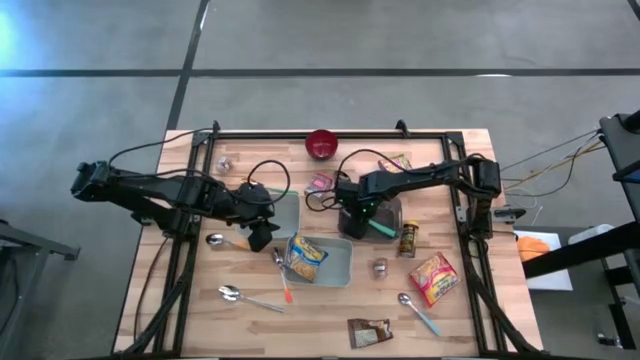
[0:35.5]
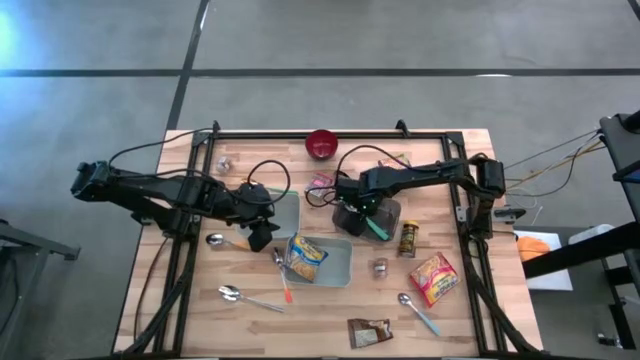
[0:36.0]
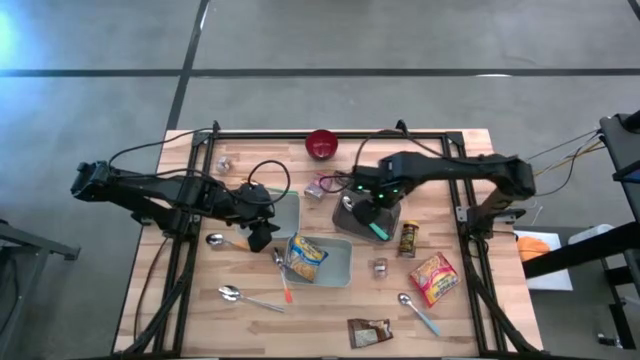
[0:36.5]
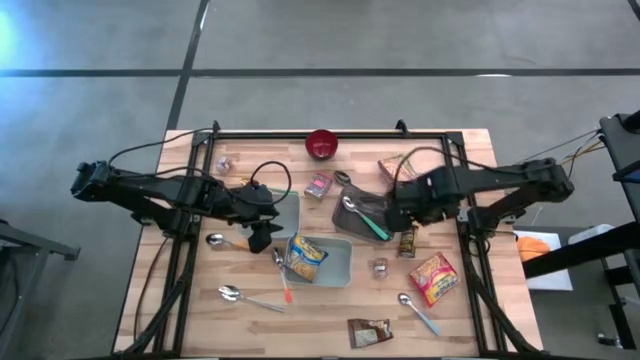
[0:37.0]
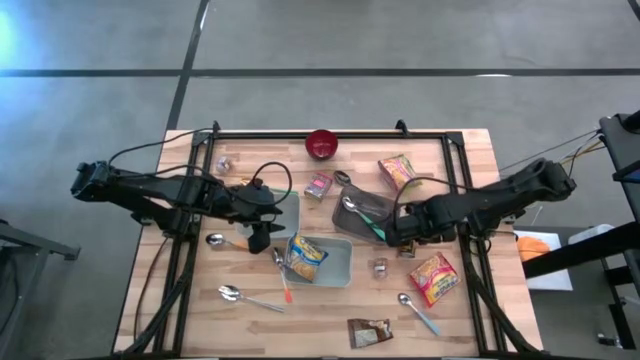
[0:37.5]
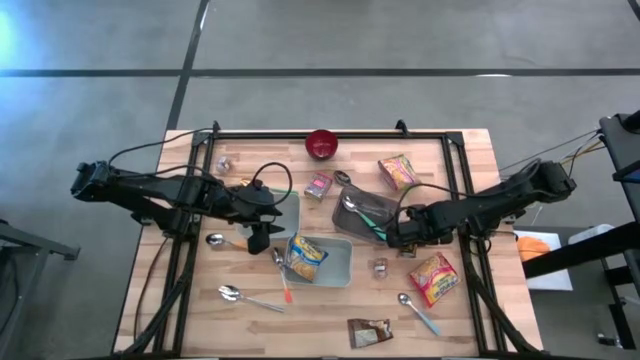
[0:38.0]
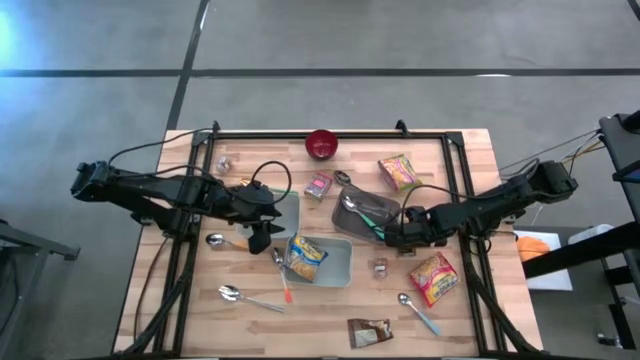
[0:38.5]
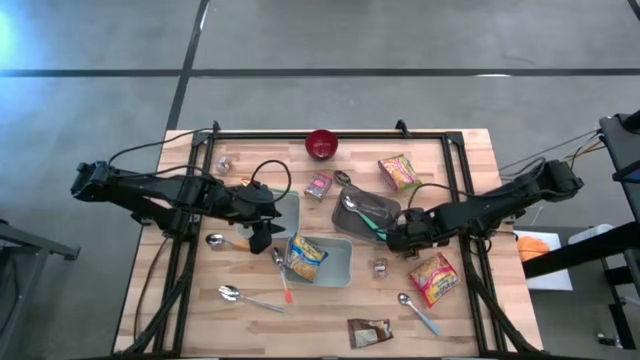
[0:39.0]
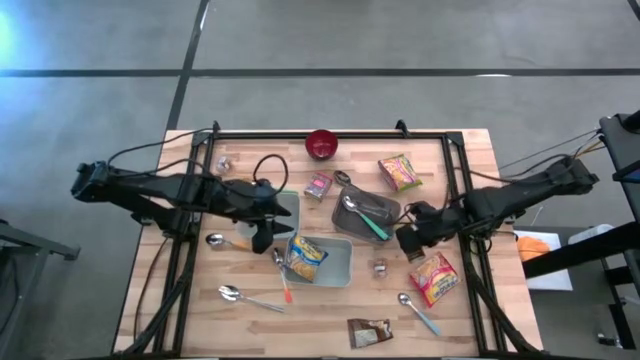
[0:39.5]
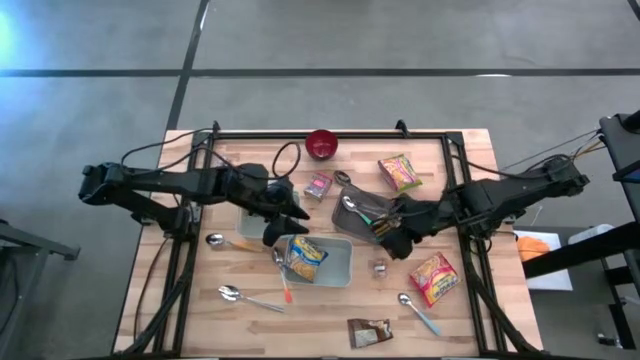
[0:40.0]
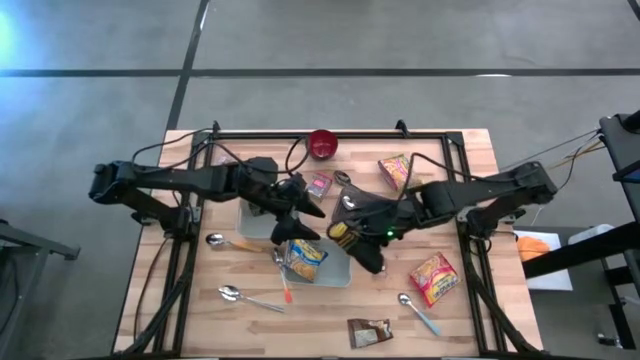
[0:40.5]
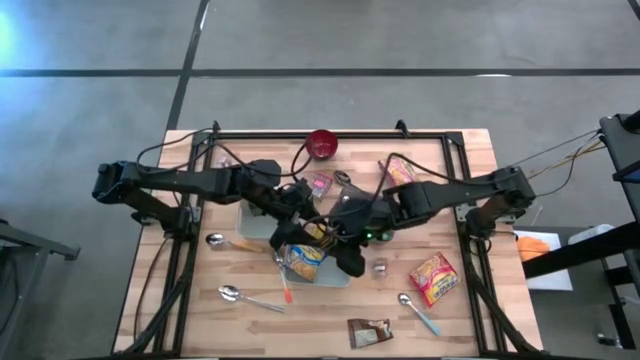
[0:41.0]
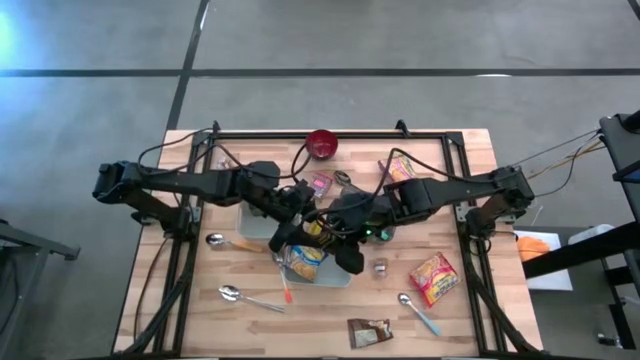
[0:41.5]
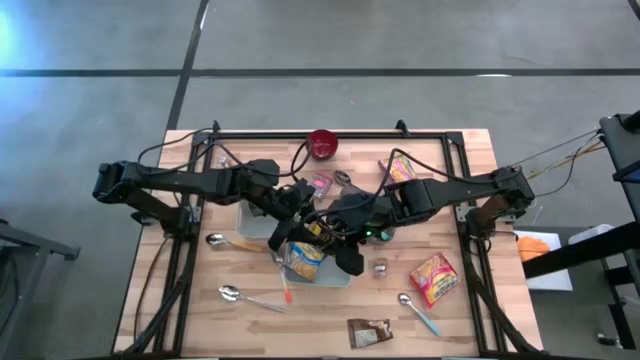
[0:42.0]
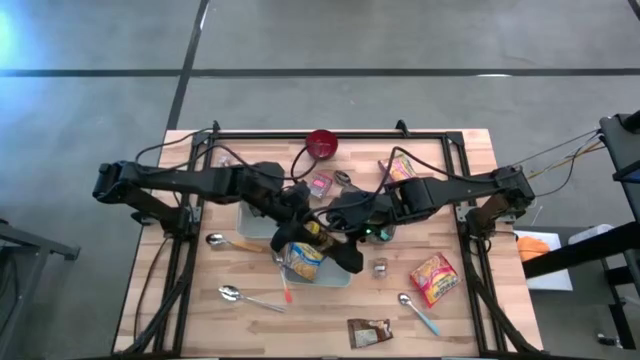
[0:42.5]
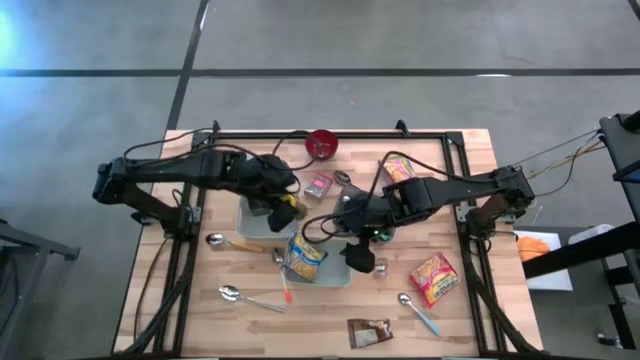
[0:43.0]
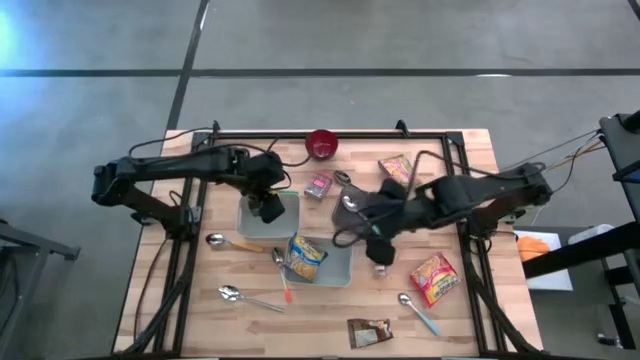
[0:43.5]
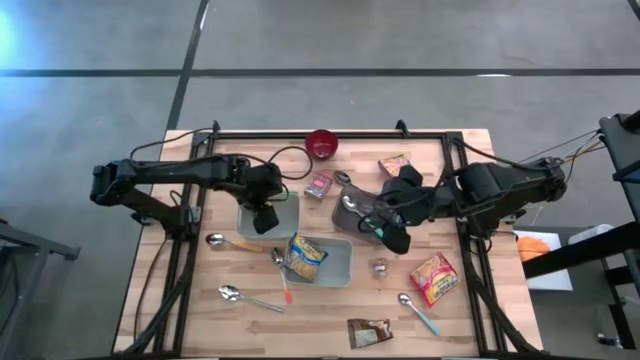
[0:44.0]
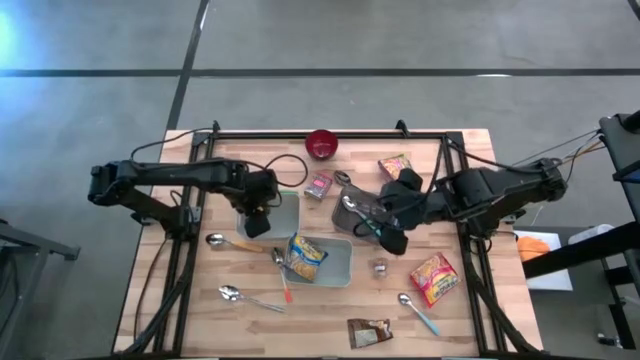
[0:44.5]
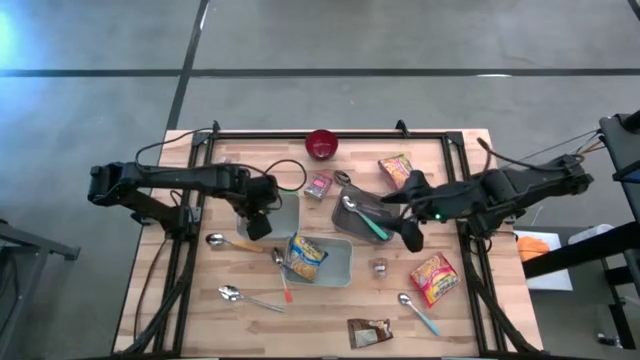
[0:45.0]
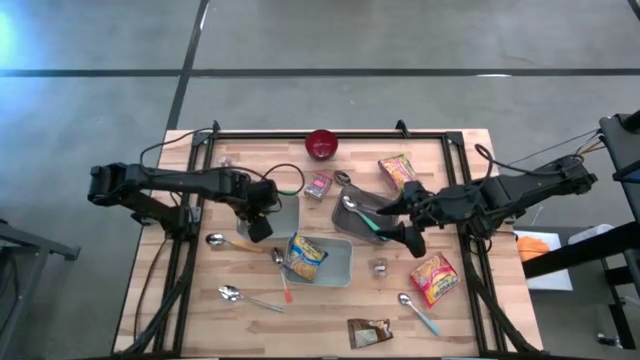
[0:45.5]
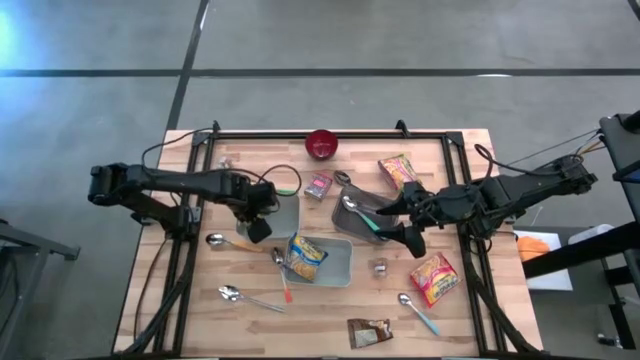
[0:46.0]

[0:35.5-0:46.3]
Put the yellow seasoning bottle into the top gray bin

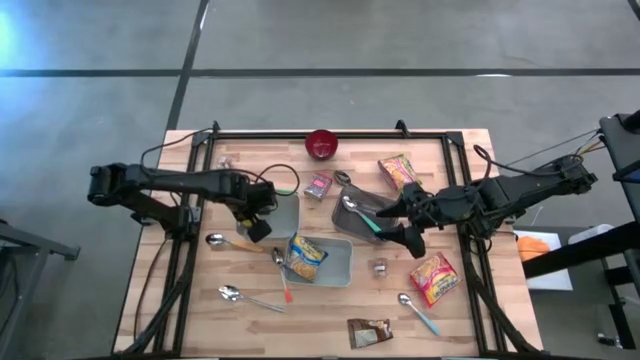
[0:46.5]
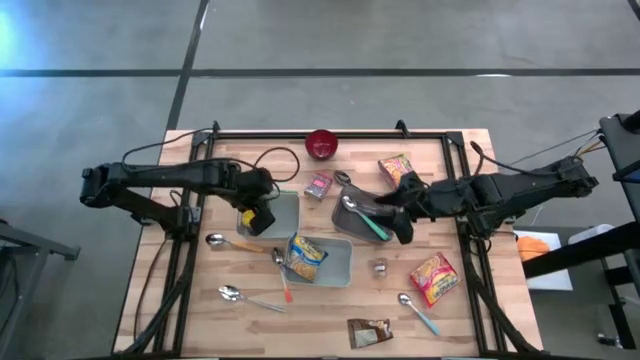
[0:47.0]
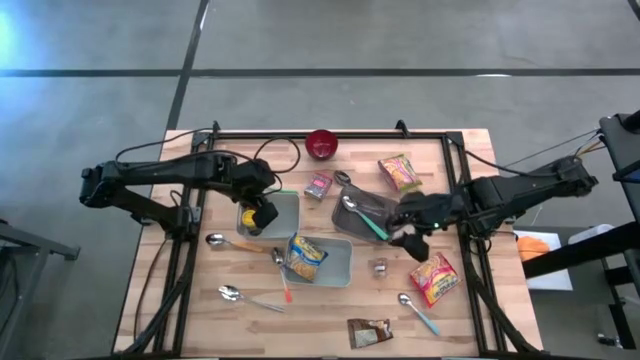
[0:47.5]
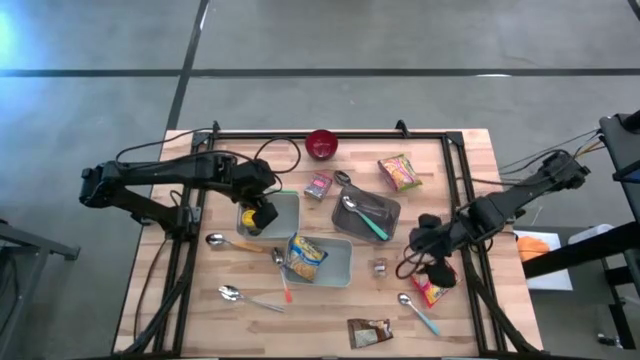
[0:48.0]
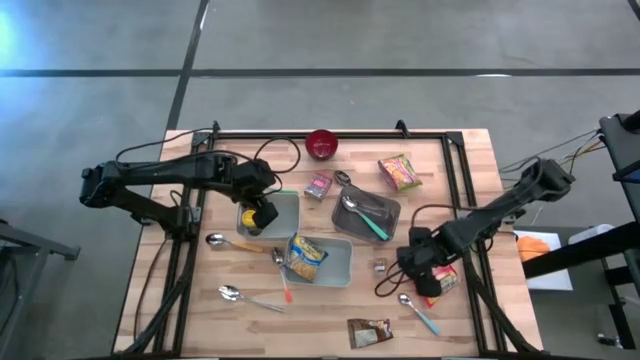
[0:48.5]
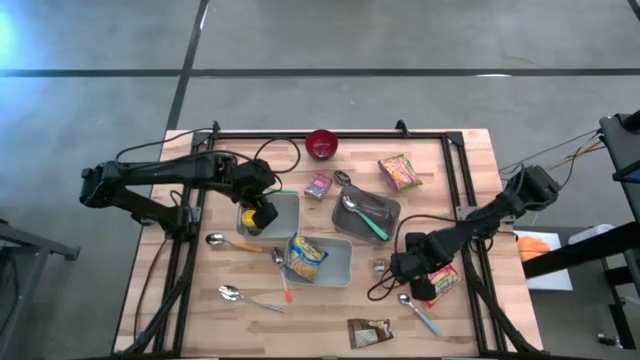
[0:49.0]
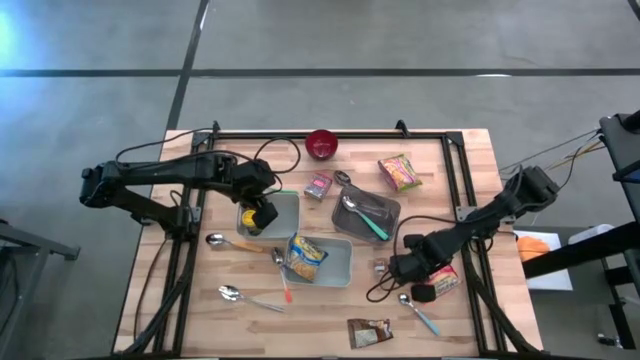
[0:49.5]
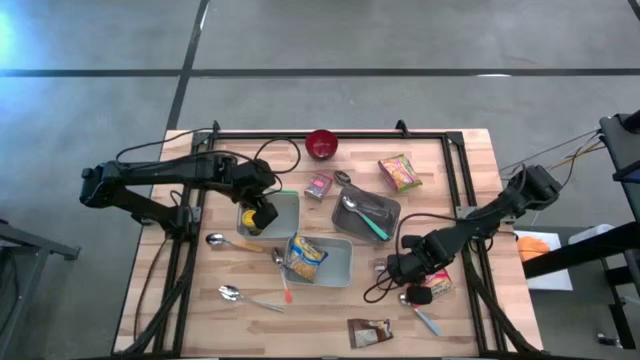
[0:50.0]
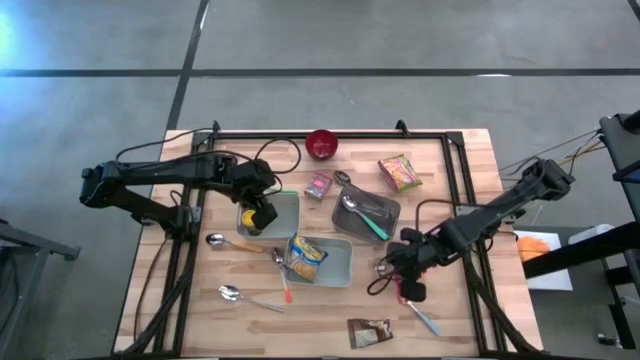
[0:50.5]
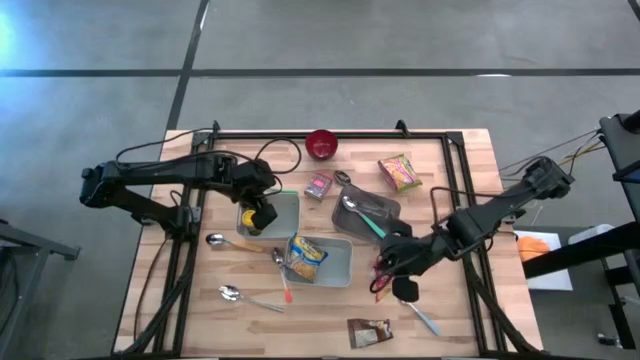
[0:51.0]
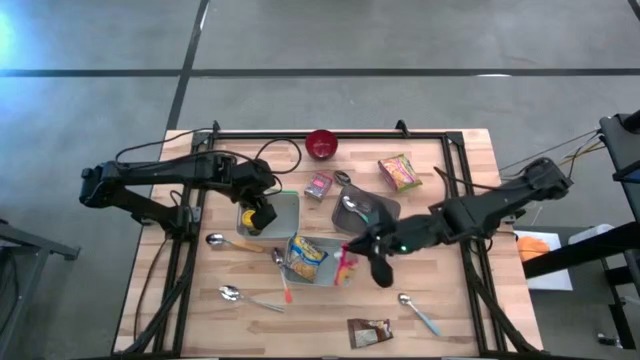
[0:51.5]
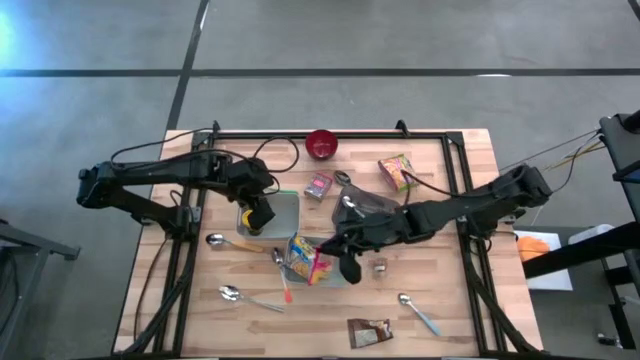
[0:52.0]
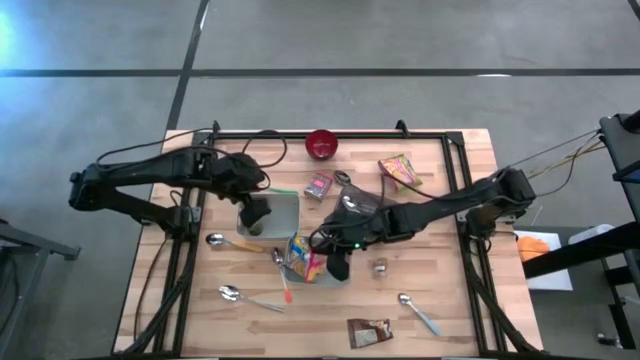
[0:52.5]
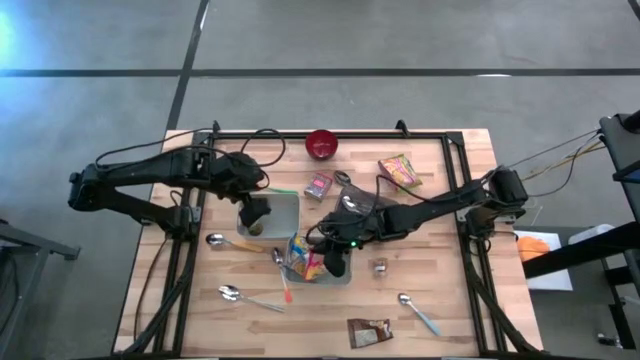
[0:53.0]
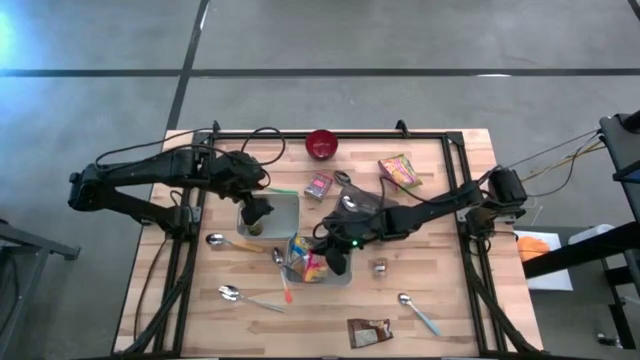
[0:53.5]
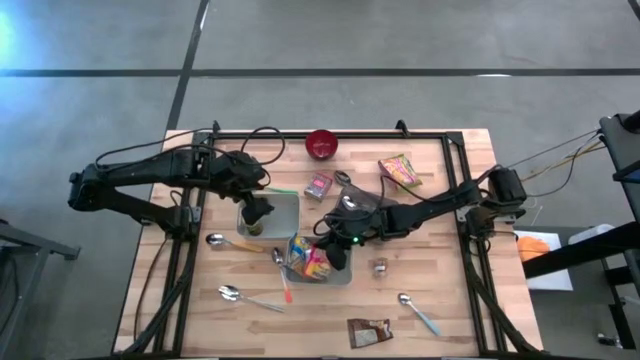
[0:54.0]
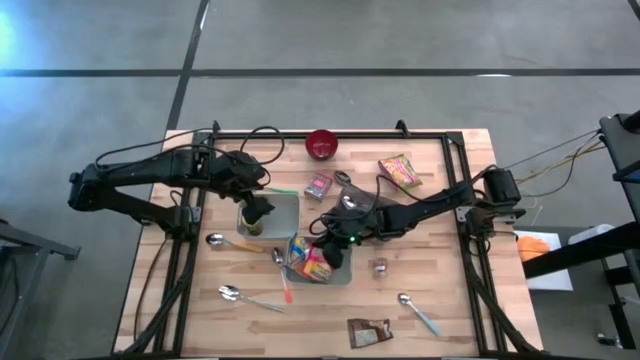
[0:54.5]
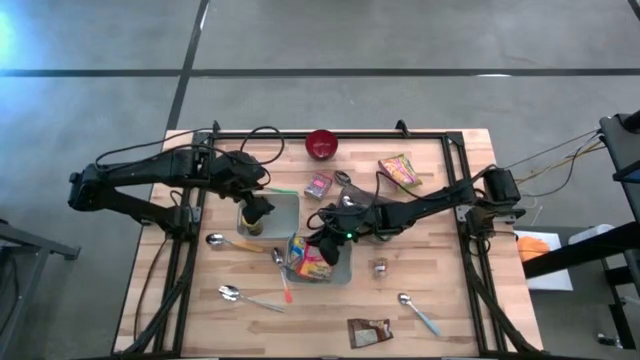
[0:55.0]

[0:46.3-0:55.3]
Put the red noodle pack into the bottom gray bin
